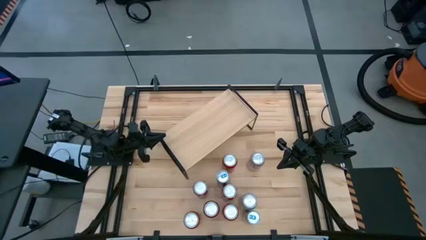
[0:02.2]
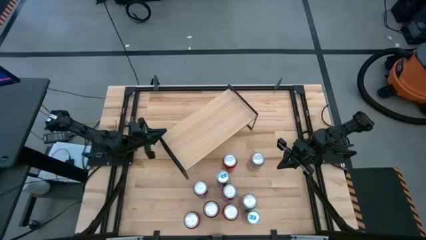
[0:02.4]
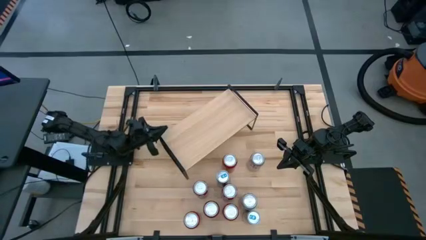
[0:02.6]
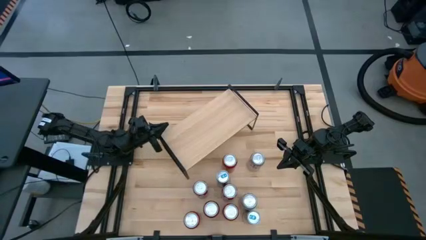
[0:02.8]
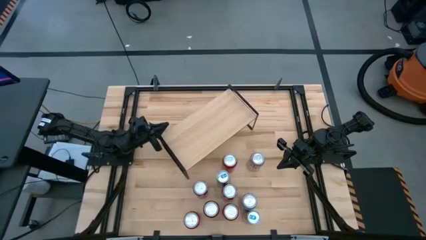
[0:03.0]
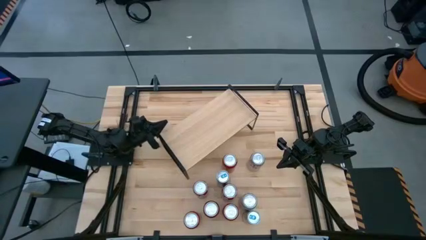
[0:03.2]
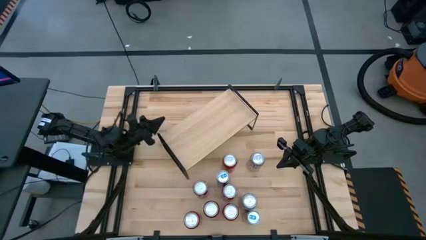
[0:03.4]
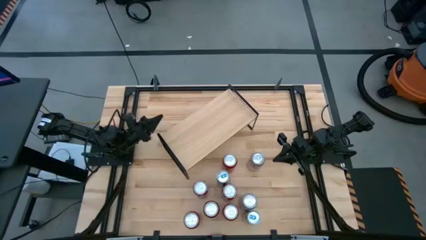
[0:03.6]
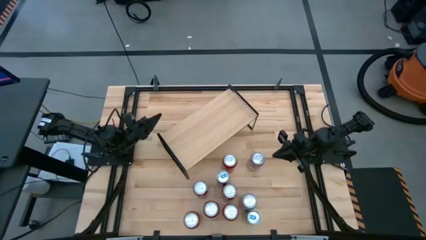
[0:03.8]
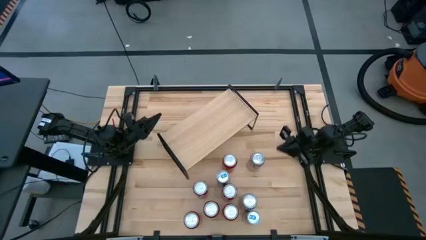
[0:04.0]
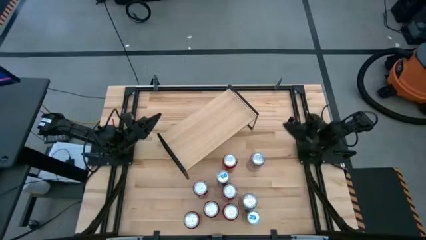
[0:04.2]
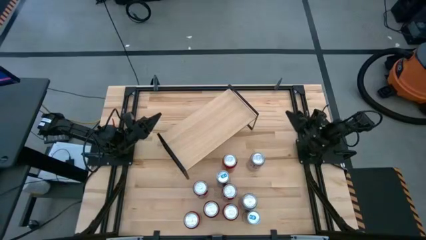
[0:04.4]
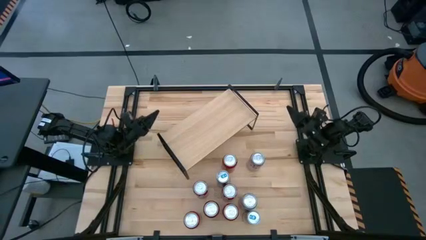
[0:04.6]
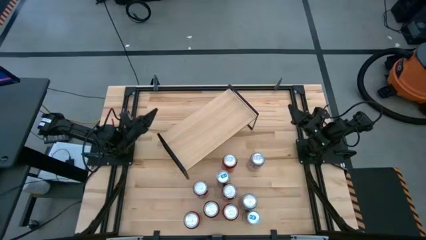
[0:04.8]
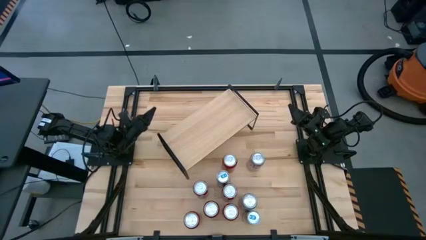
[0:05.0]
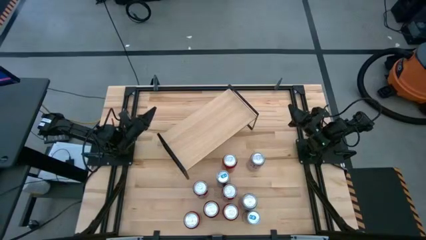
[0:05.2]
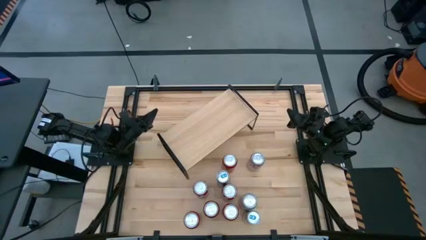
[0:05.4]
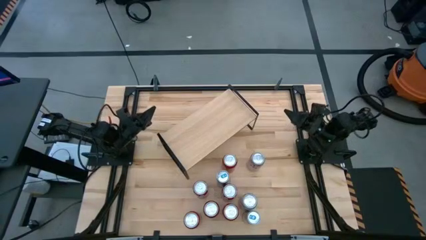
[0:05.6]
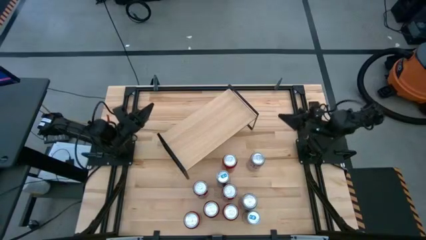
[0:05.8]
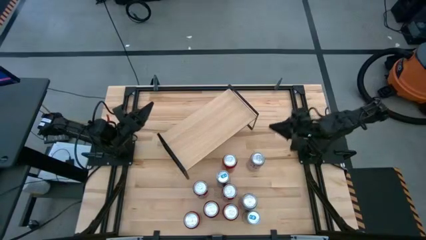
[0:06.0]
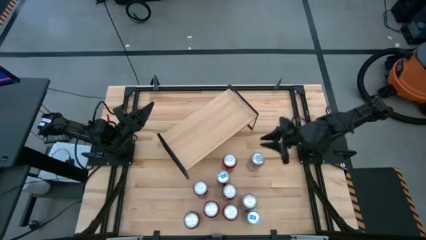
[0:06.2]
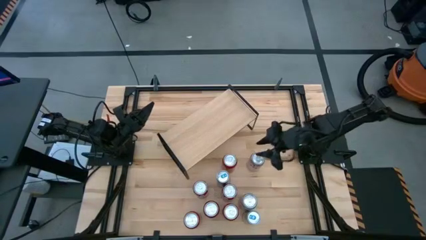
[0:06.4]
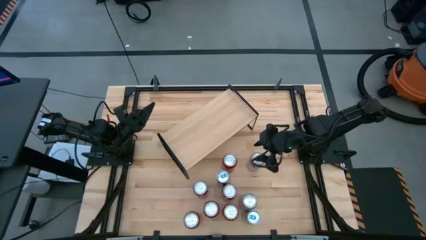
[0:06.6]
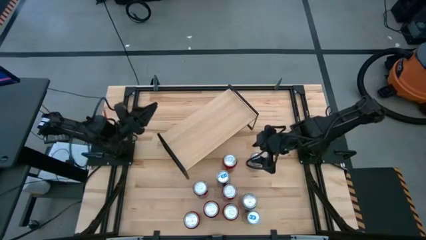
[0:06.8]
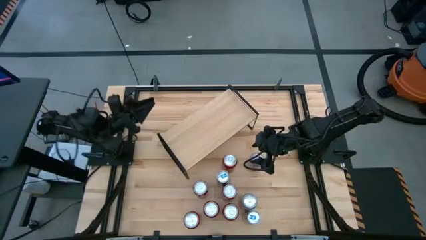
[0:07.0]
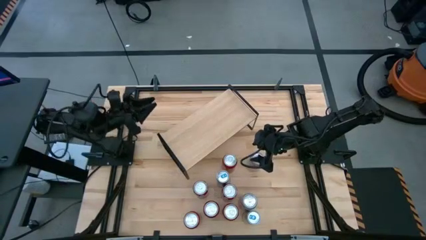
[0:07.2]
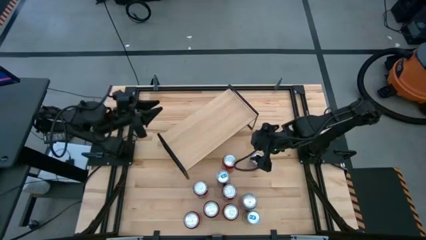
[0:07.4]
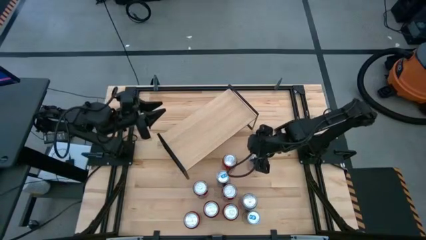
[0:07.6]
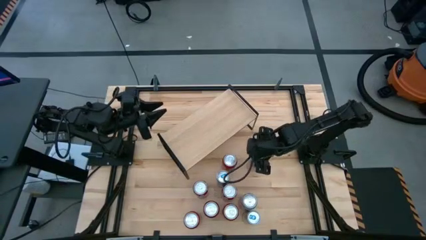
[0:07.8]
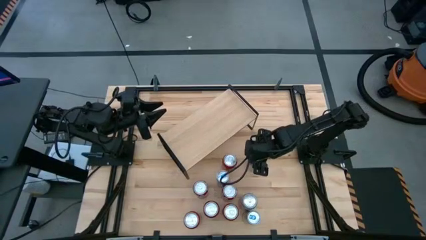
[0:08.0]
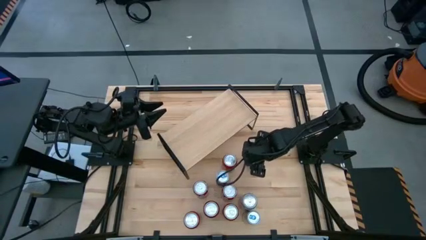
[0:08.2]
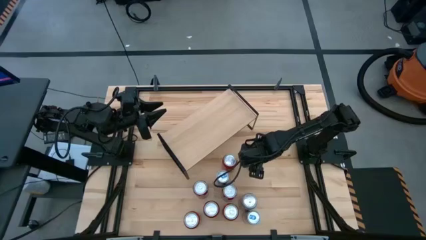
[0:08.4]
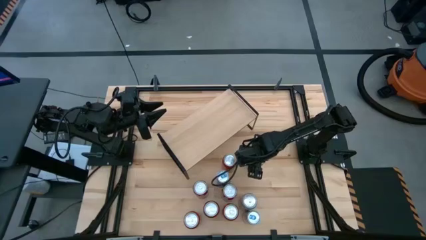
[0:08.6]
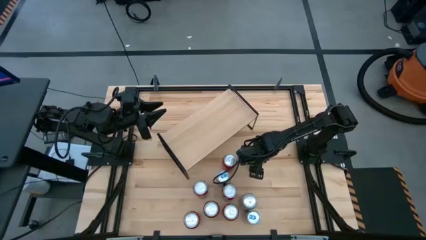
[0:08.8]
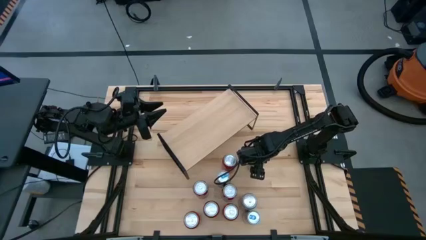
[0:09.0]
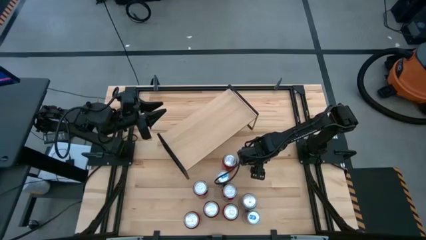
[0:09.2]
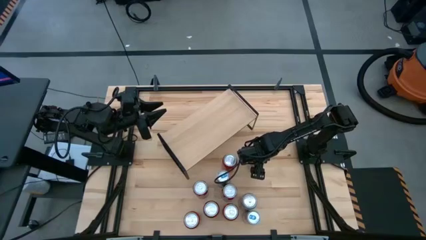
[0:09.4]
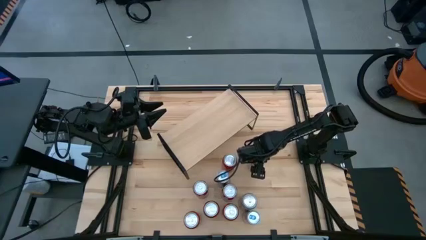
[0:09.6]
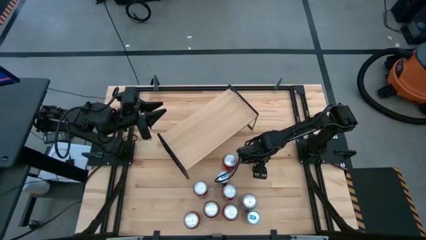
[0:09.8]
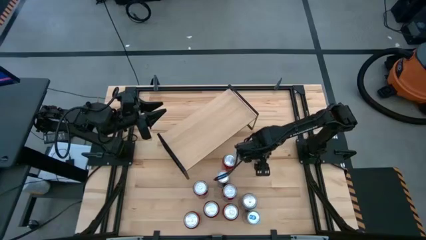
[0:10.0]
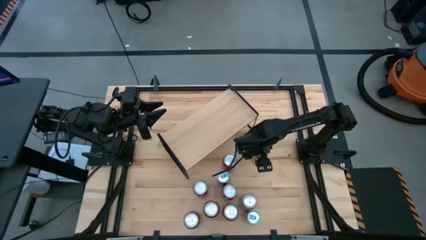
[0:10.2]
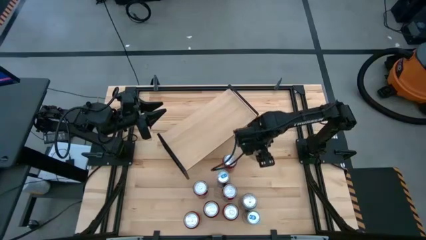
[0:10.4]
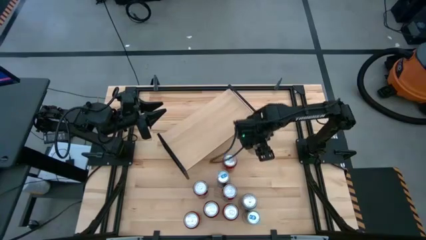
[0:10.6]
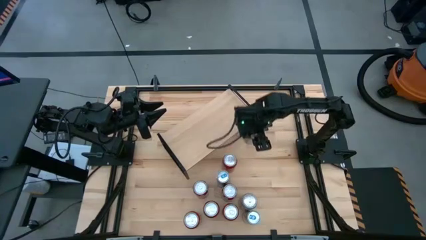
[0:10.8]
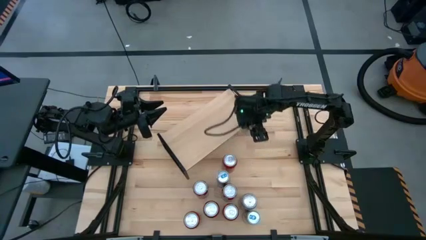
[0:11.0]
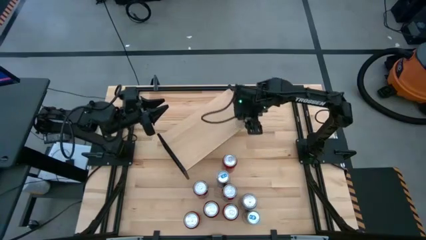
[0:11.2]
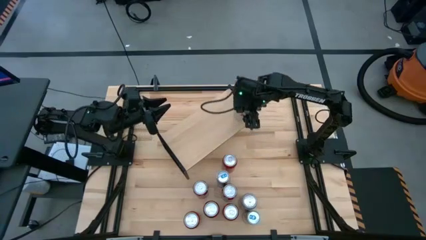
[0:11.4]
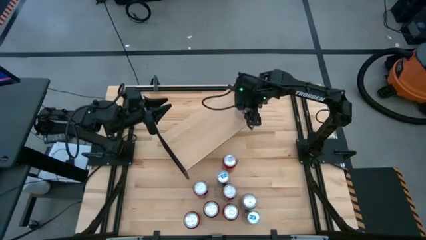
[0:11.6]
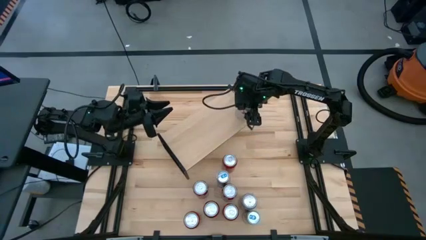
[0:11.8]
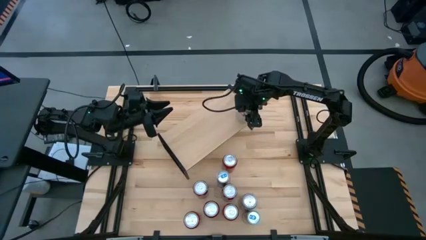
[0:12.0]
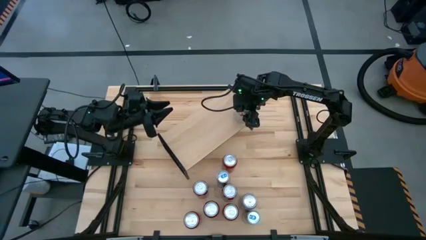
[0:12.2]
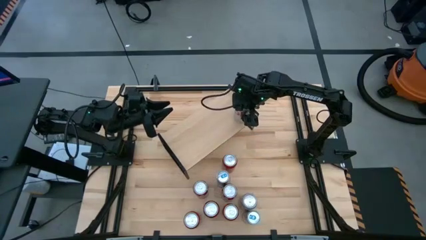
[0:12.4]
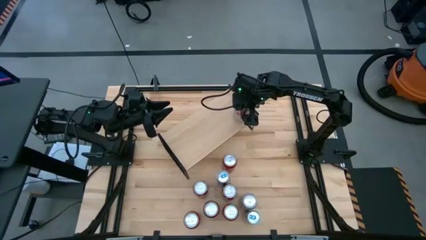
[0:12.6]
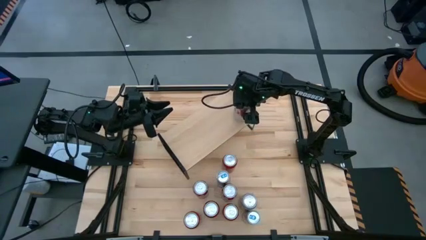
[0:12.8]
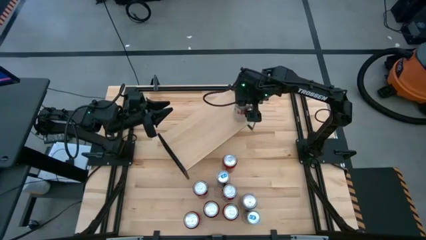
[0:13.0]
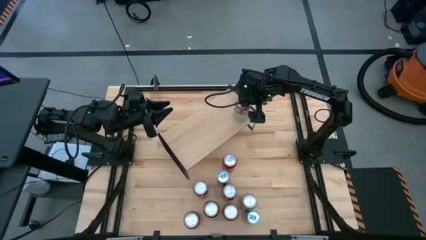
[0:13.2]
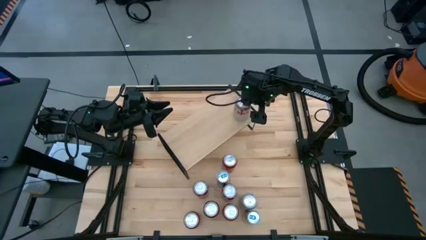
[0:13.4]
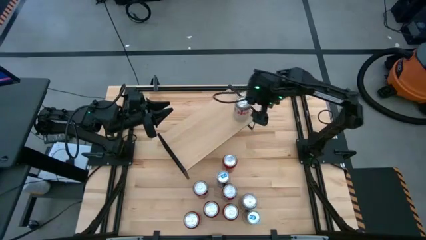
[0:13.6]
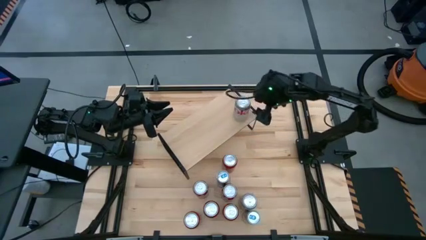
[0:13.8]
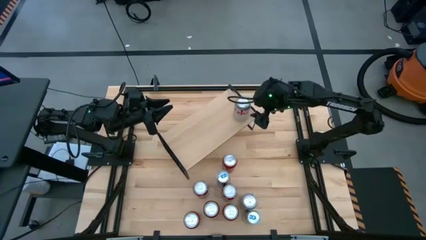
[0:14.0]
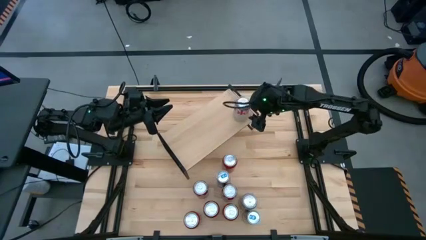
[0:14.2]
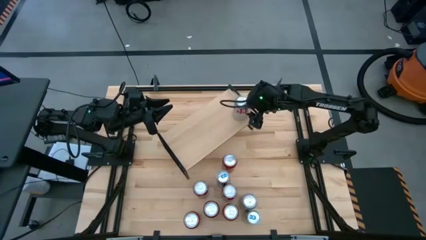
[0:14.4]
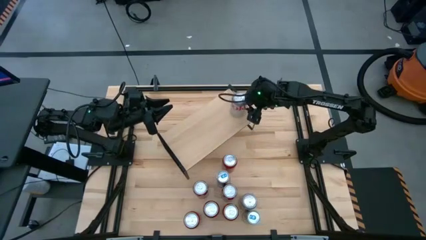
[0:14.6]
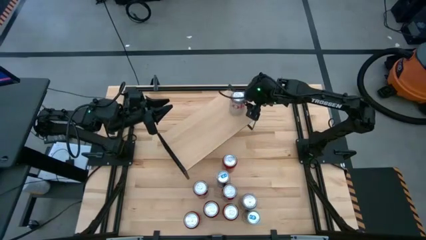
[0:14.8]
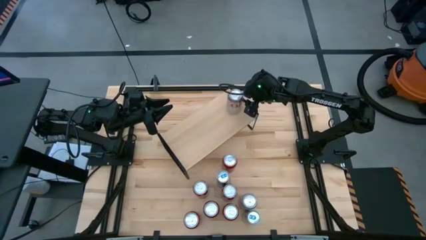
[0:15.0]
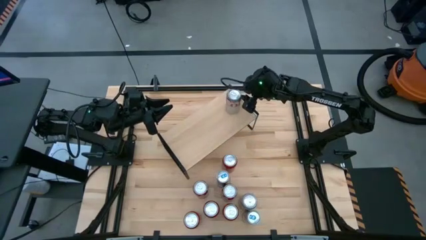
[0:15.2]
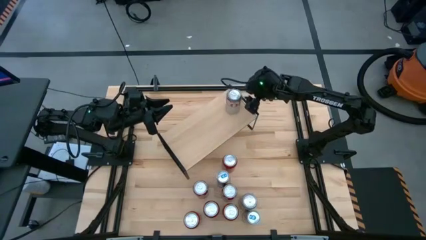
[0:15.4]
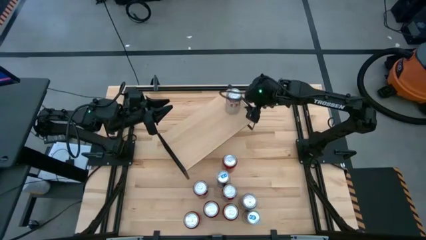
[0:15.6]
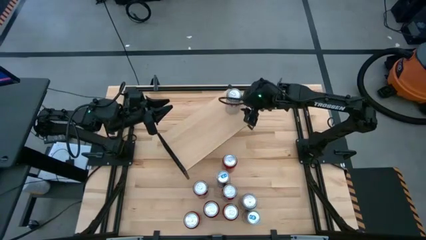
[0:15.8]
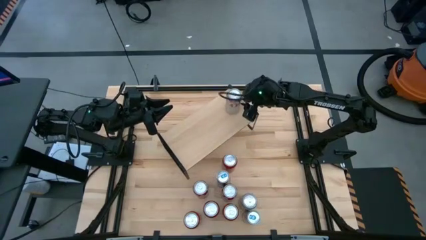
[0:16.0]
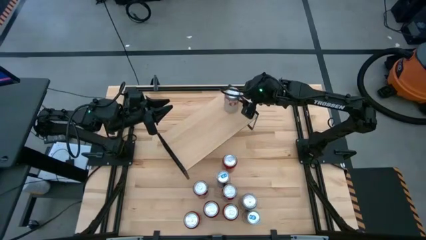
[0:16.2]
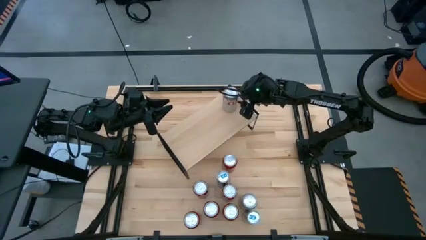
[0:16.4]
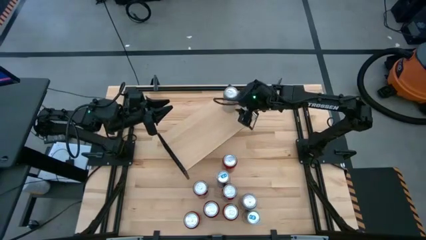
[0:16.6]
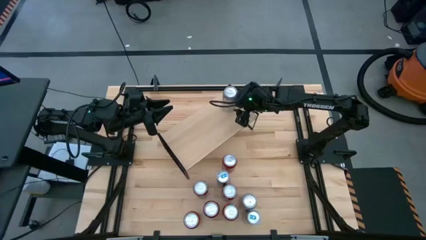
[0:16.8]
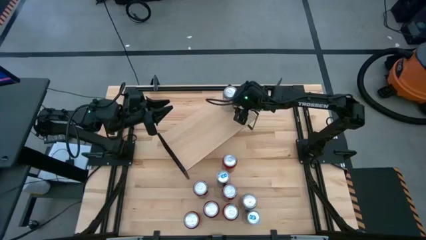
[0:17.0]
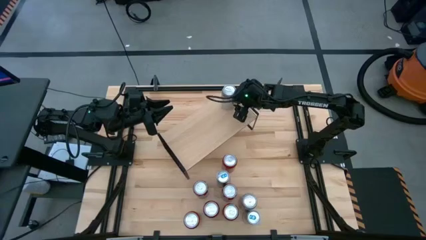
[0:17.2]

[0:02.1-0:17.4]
Task: Place canned beverage on shelf
Put the top red and silver soda can on the shelf

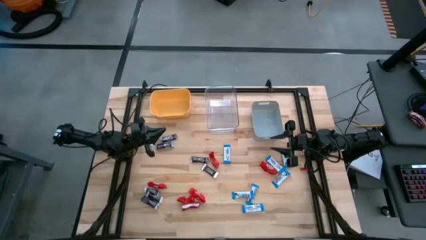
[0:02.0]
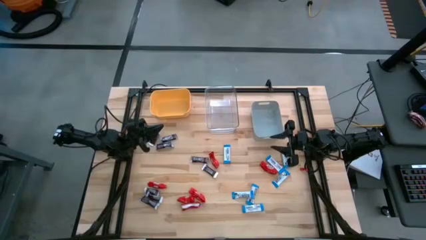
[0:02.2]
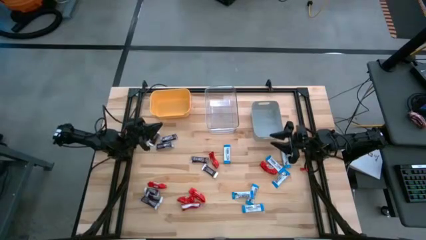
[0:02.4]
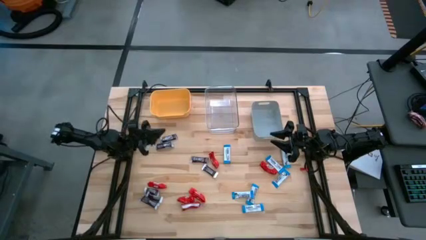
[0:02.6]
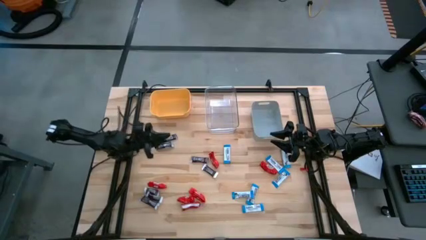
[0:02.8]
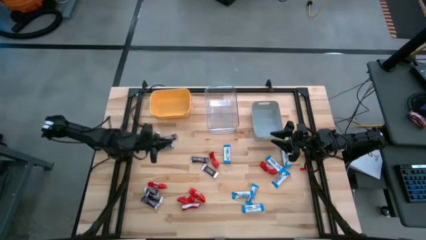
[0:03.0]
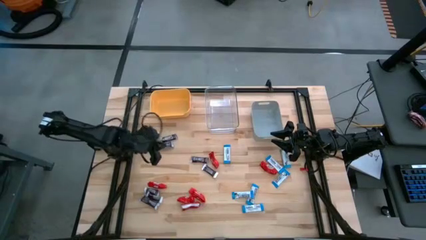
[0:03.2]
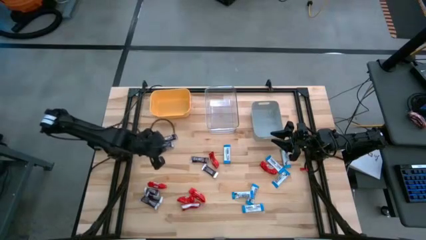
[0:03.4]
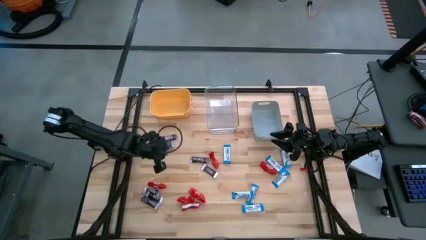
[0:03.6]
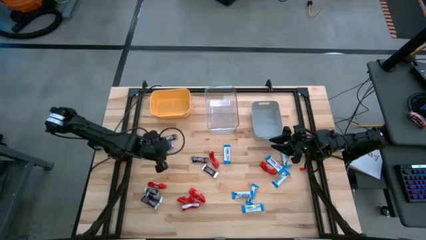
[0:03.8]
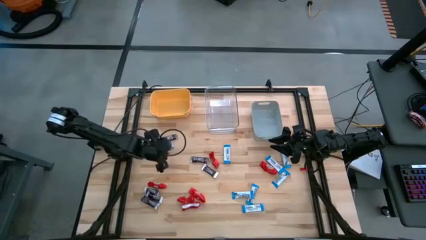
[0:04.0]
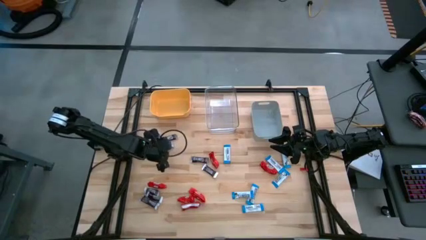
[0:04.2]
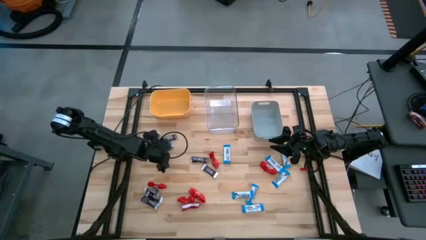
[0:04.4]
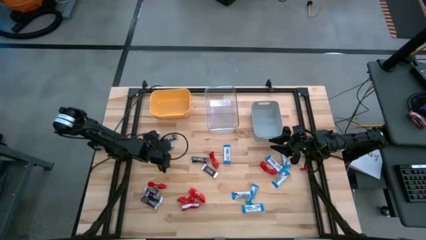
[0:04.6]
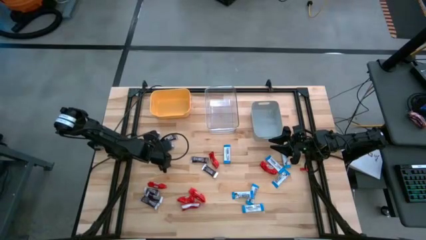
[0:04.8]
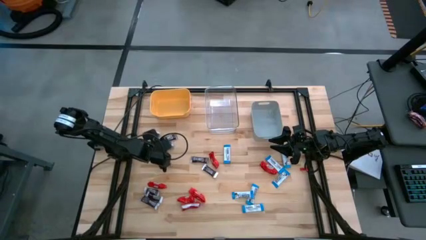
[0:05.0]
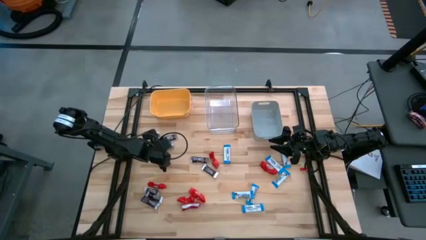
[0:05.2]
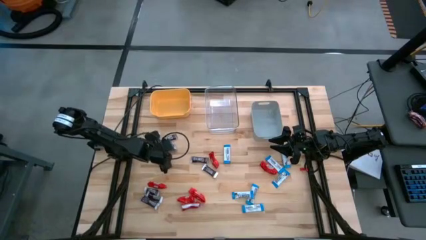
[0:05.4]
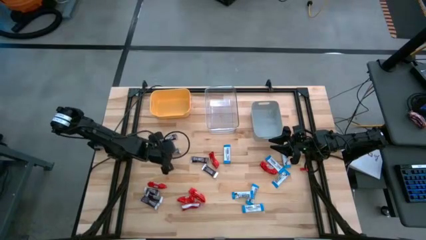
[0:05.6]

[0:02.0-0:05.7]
Task: Sort candy
Put the brown chocolate into the transparent bin
